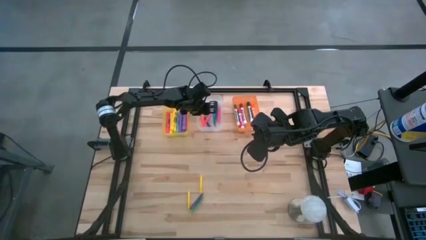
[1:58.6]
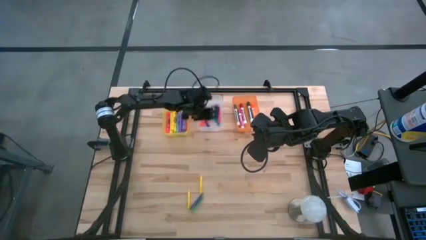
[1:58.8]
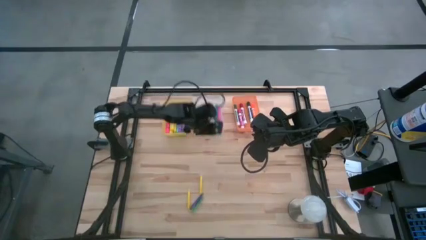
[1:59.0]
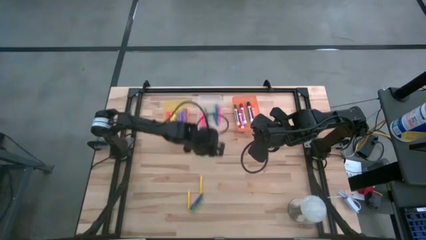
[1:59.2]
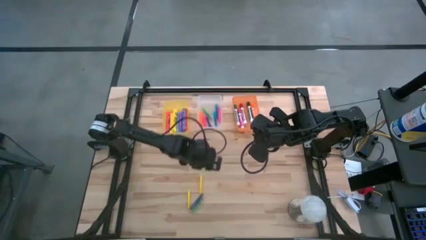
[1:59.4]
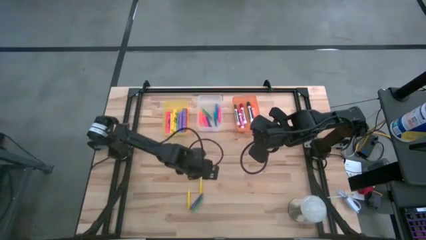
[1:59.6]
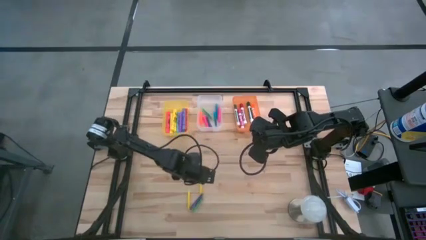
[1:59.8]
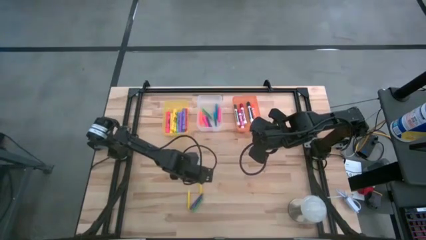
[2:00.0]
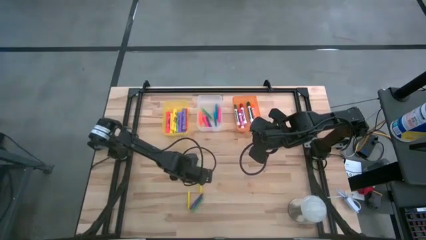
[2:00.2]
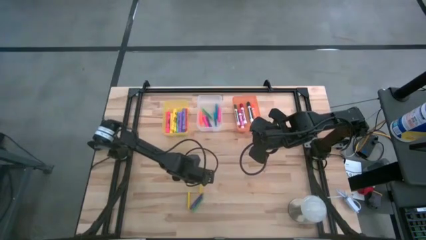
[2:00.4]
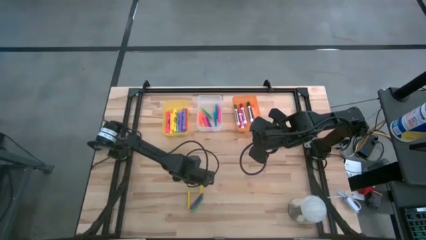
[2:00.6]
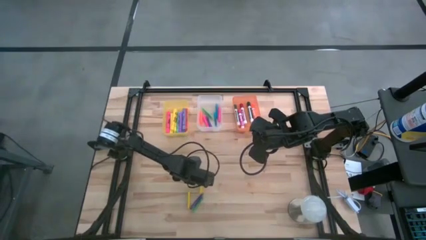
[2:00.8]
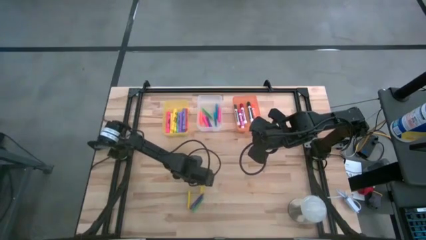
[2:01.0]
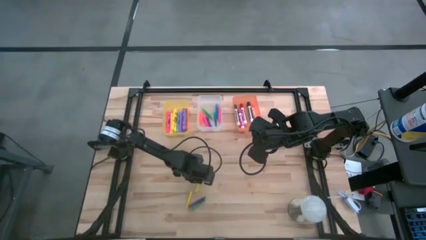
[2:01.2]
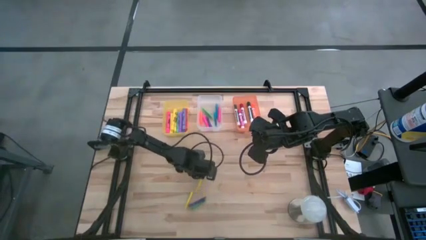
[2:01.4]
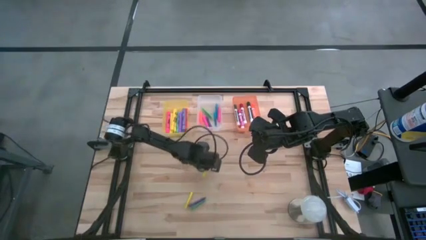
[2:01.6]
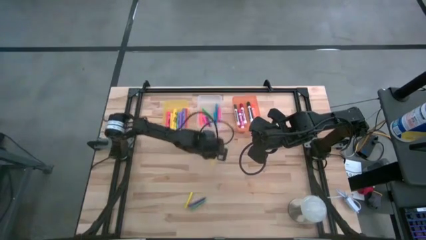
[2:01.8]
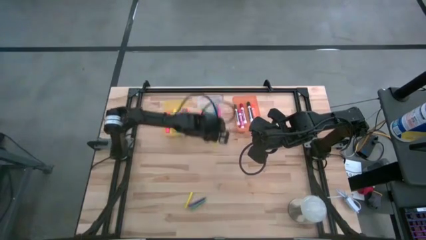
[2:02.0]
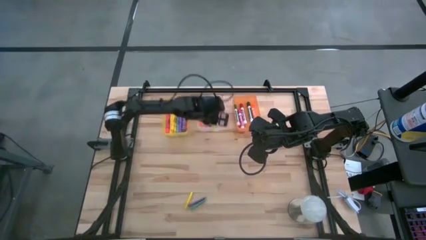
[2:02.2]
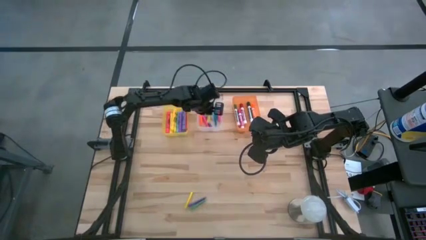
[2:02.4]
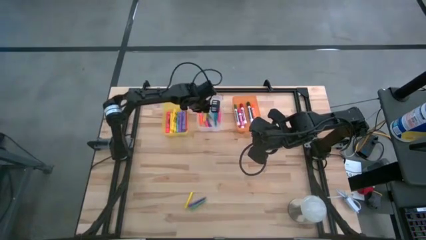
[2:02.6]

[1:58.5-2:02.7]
Task: Pick & Place Markers
Put the top yellow pen into the white bin

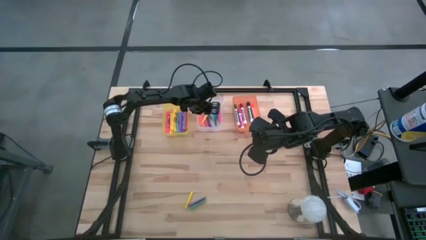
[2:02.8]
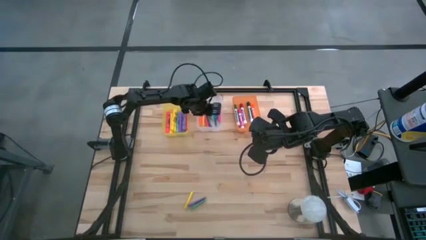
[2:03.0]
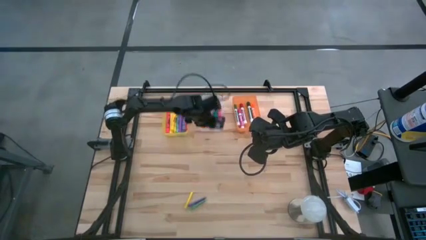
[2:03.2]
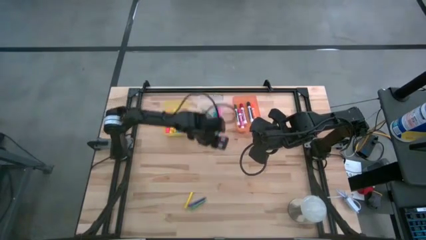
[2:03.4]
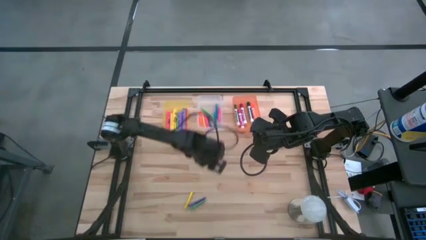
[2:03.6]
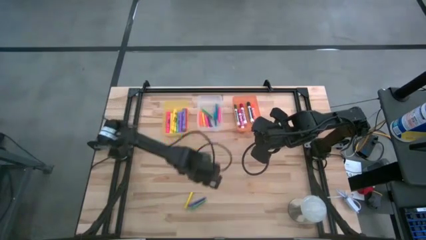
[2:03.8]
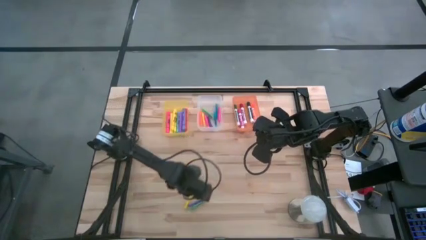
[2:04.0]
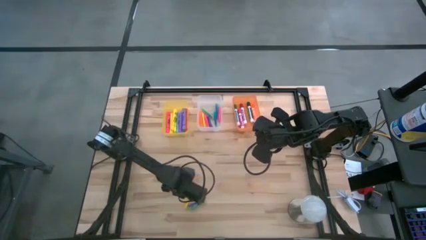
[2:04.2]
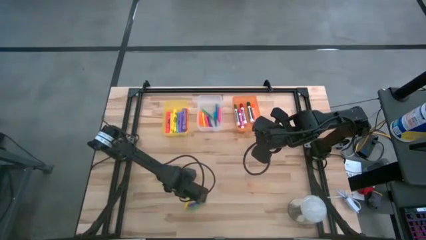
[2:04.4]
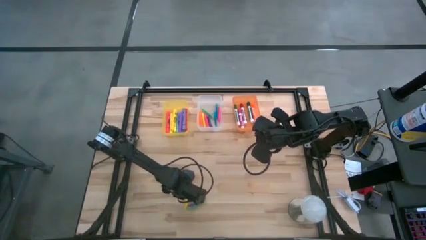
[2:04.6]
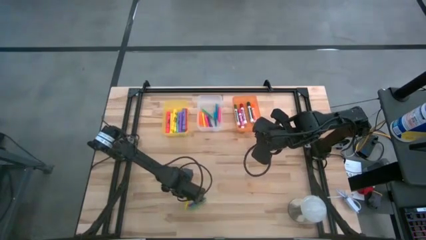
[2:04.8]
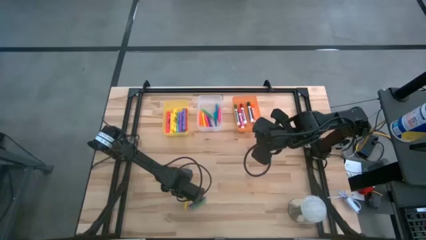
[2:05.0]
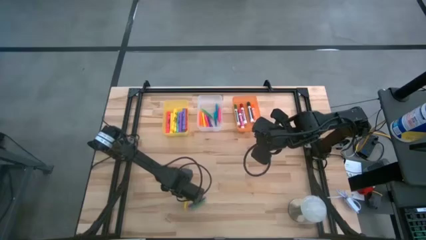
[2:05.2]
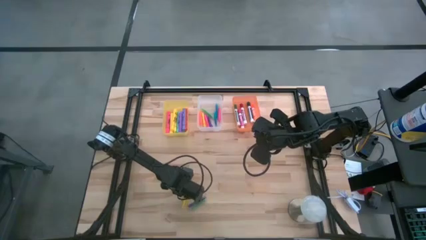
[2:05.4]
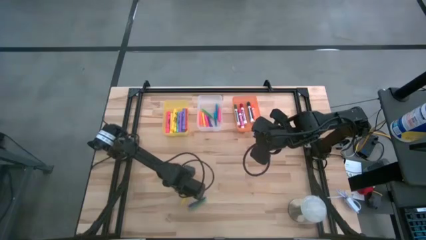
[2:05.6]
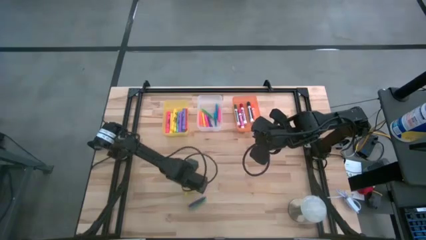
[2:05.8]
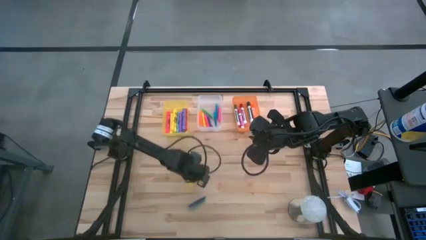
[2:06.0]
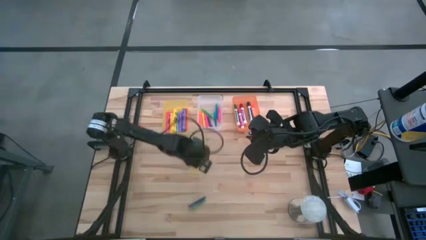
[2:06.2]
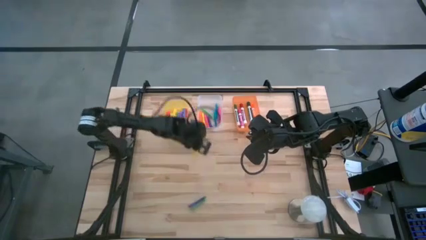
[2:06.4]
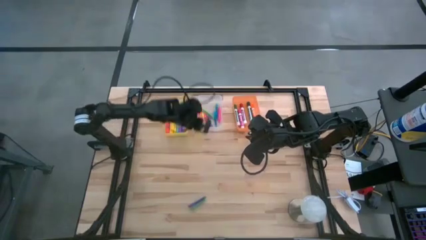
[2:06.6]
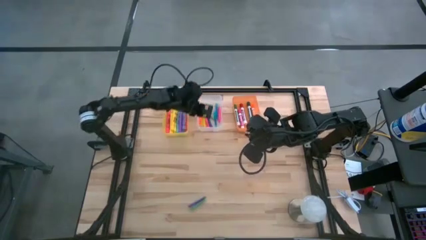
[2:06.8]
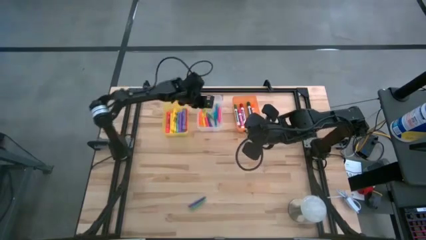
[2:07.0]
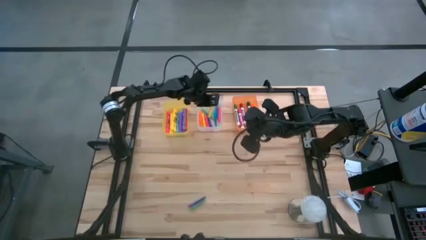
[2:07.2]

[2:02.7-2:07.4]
Put the yellow pen into the white bin

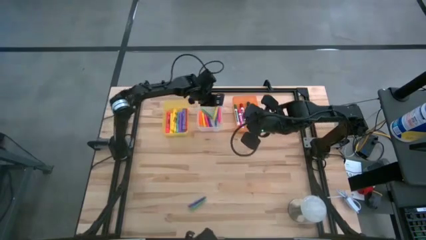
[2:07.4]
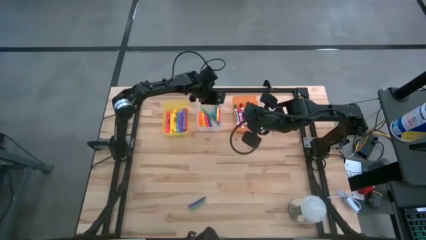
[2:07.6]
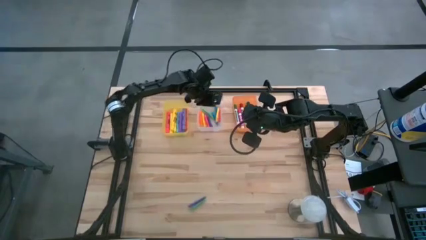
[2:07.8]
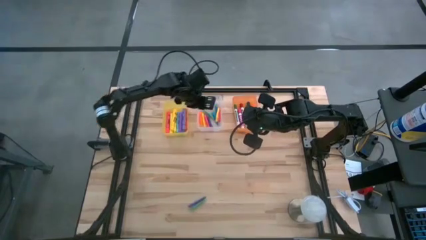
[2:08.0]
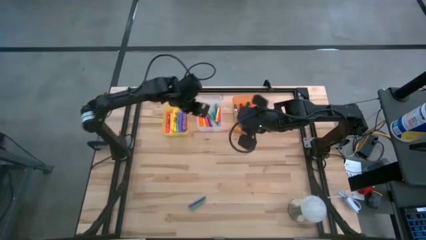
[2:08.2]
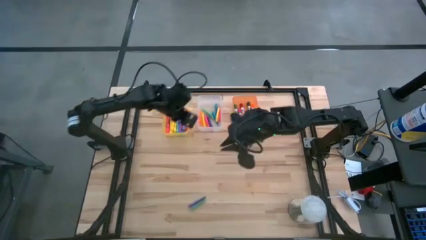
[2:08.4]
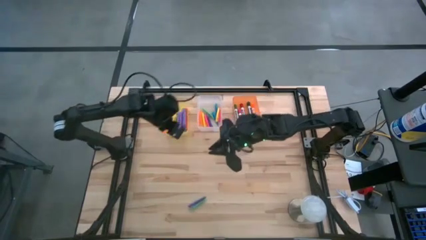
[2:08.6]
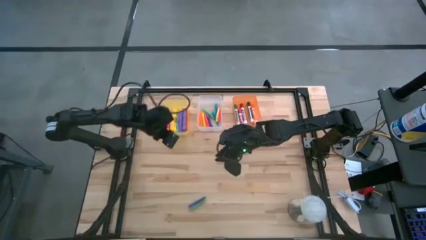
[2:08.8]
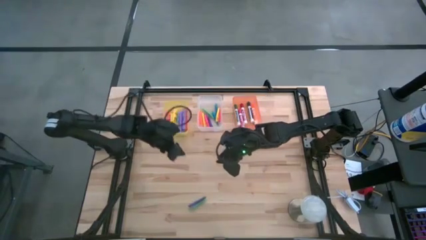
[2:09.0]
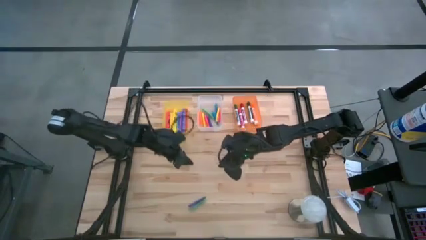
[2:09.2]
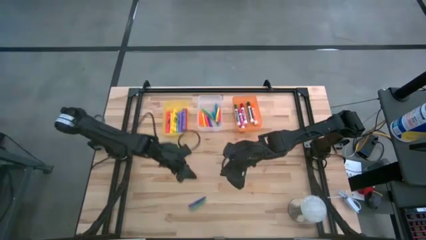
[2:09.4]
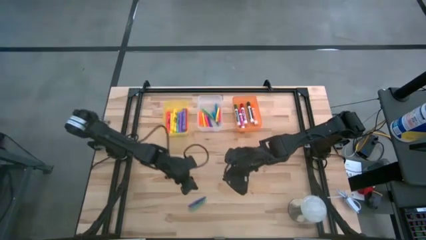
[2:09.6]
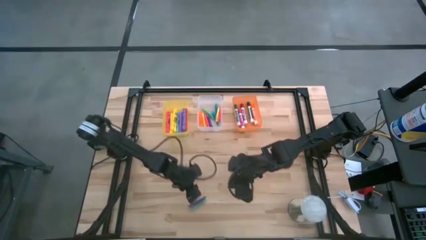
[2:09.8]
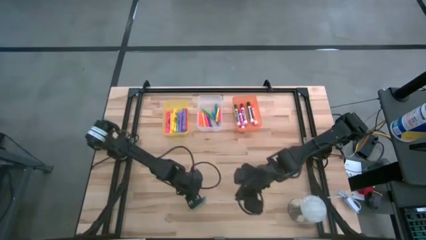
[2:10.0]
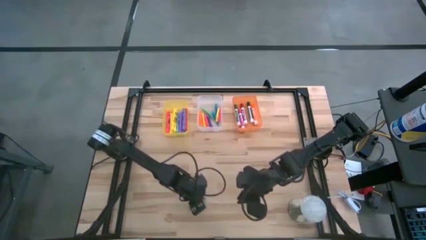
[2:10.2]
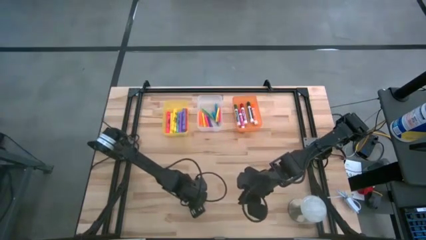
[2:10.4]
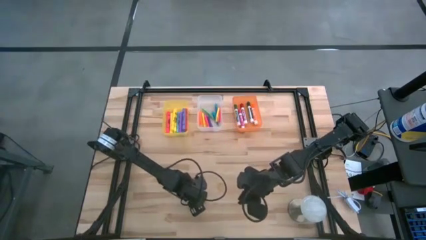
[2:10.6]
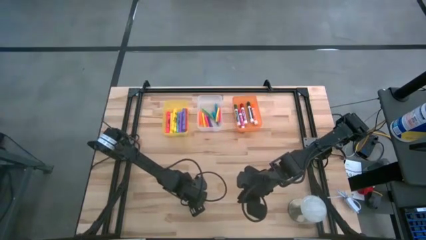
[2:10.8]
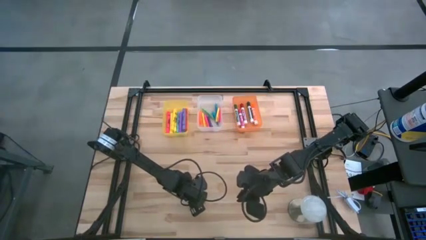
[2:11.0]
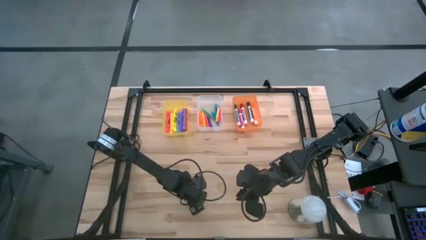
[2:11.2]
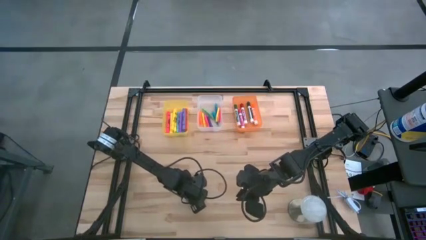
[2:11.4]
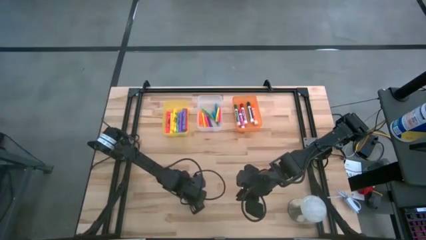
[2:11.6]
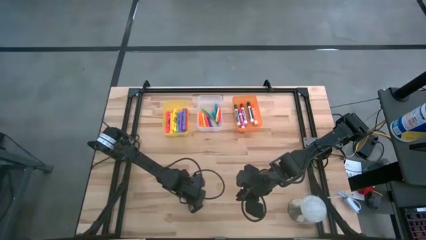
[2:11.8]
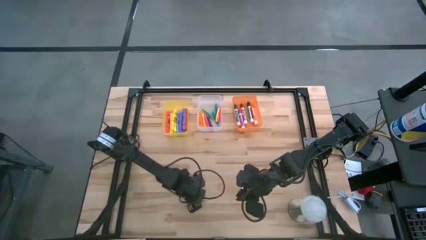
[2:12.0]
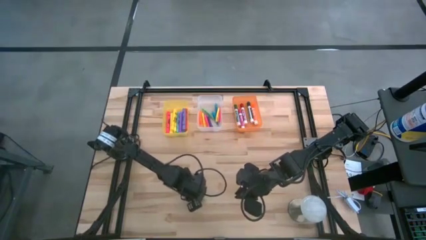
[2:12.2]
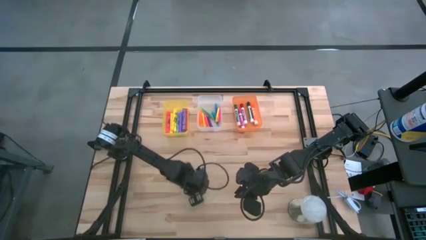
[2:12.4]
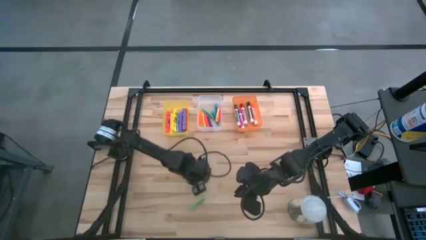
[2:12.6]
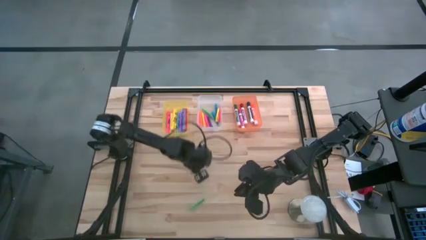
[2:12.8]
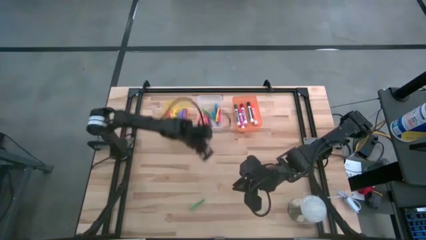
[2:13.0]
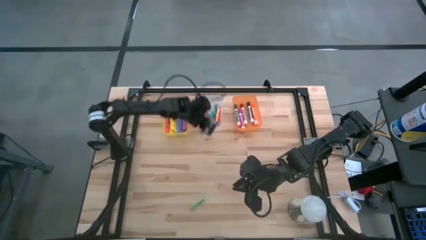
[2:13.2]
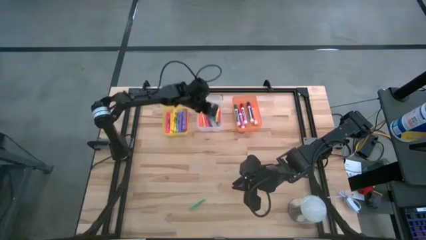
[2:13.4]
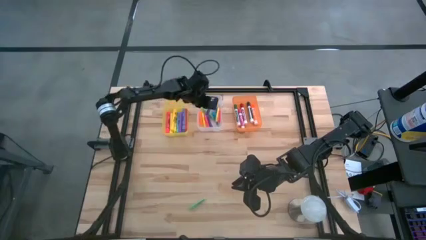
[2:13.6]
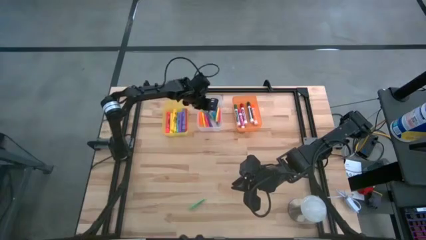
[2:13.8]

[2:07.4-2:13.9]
Put the purple pen into the white bin

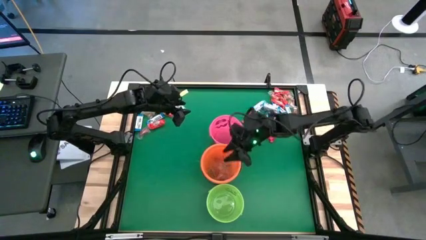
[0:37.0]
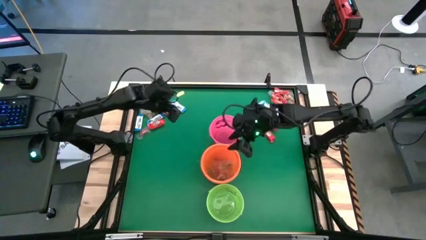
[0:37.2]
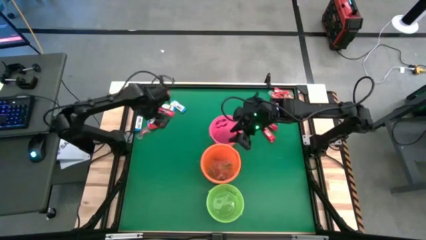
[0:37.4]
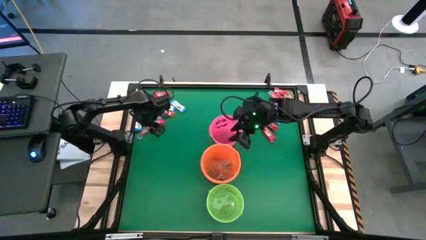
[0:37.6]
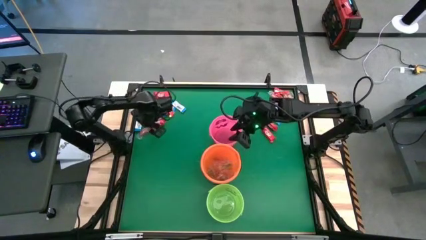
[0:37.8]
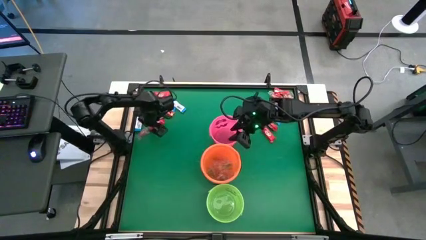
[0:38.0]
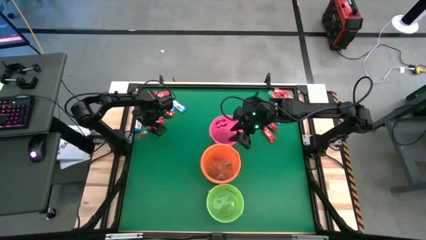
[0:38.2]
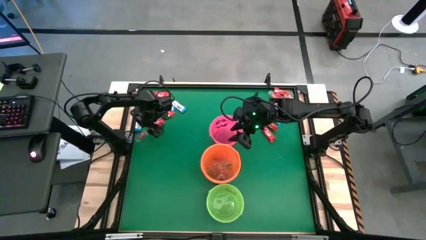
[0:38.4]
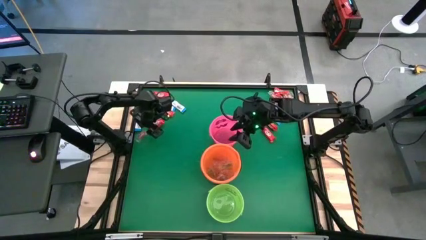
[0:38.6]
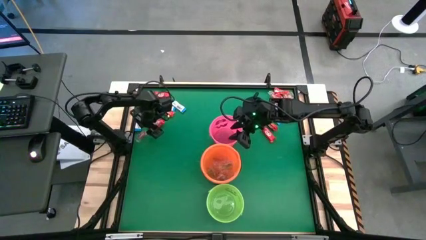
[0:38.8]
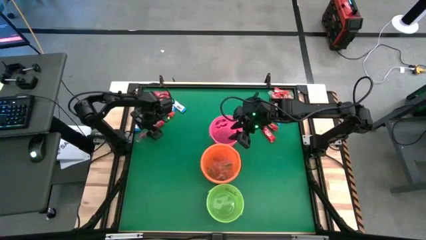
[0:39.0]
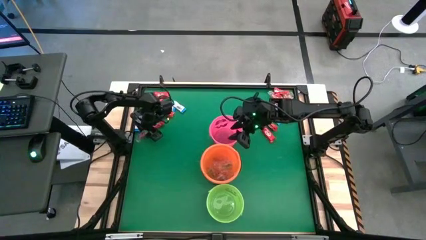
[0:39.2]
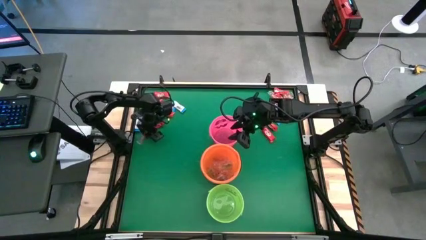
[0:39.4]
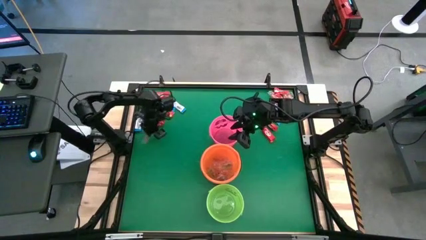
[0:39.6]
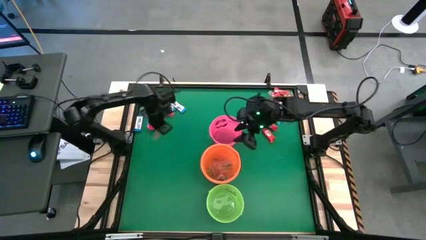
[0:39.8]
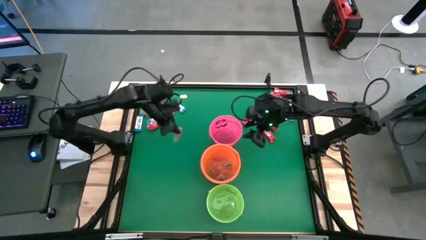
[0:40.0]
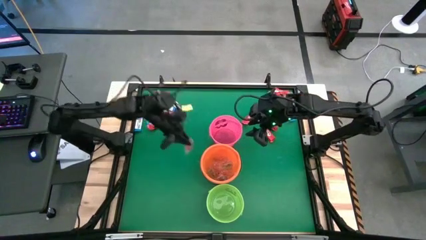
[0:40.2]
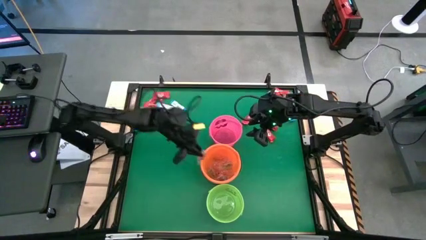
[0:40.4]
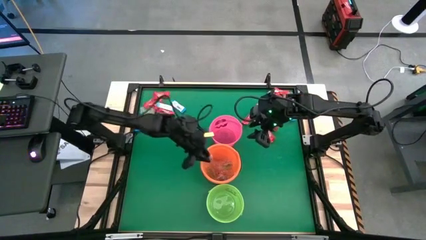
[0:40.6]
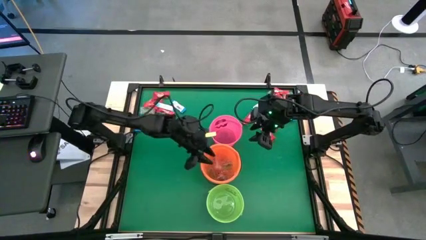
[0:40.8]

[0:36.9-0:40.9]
Task: Sort candy by brand, put in halloween buckets
Put the red gummy into the orange bucket
